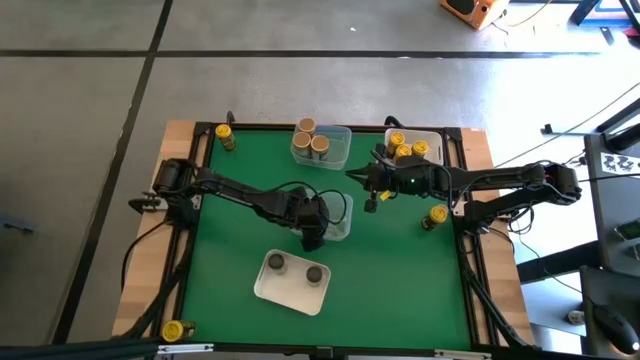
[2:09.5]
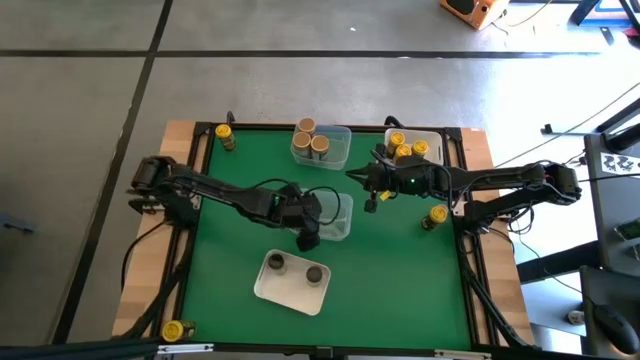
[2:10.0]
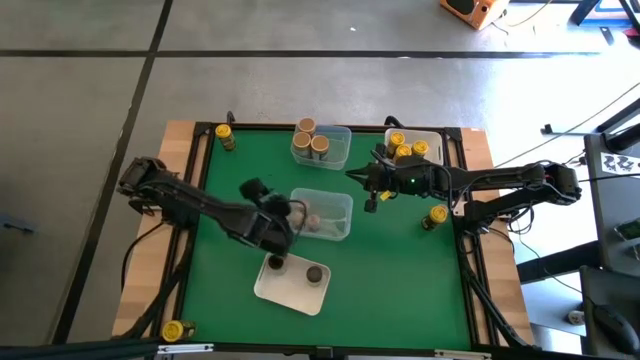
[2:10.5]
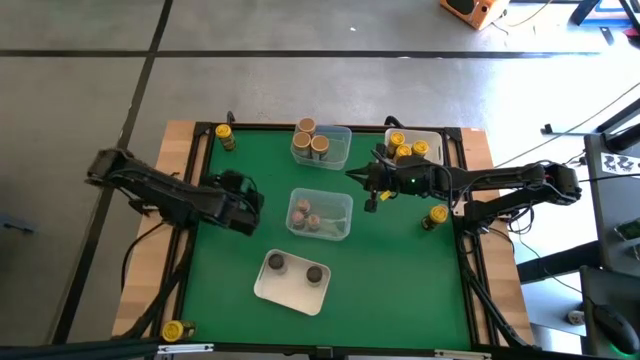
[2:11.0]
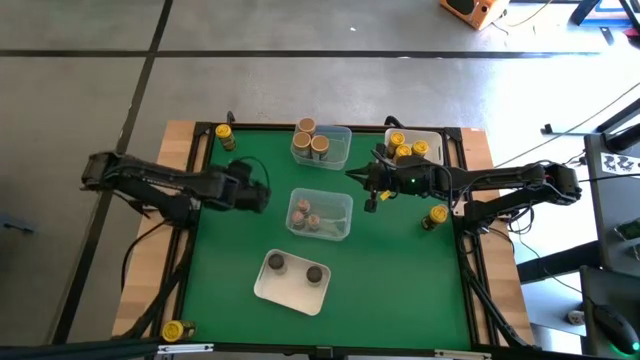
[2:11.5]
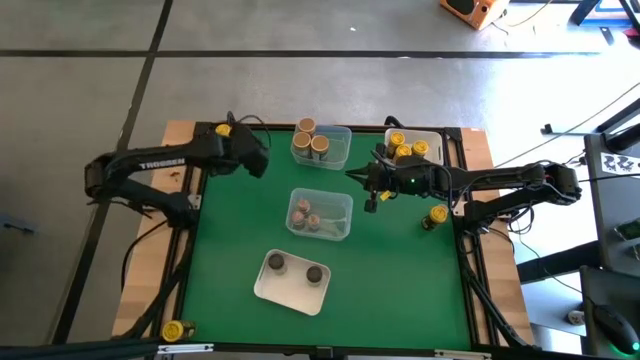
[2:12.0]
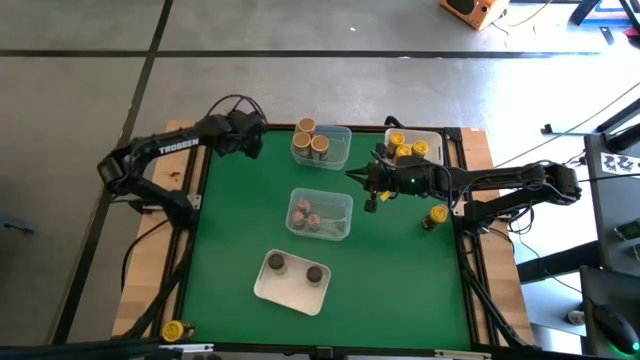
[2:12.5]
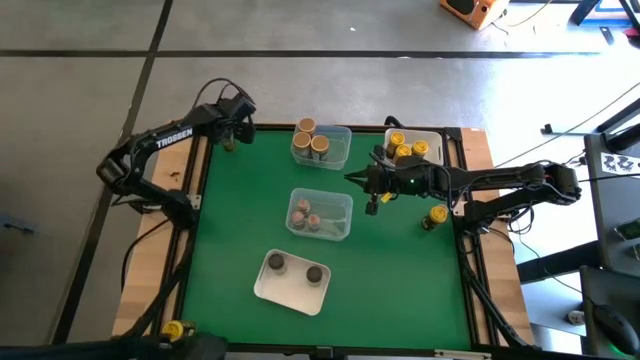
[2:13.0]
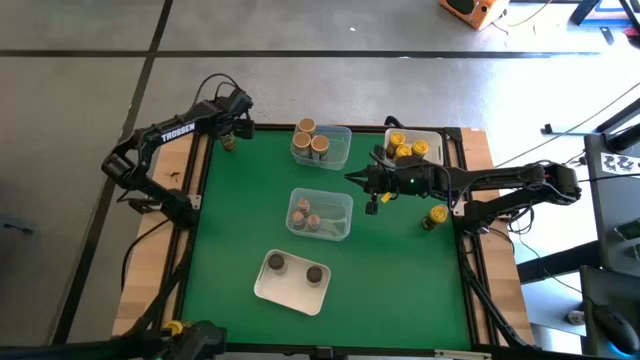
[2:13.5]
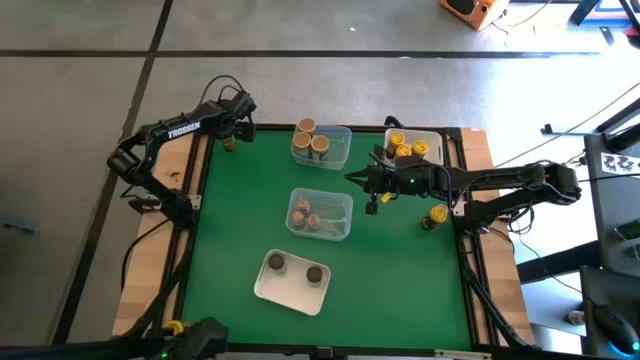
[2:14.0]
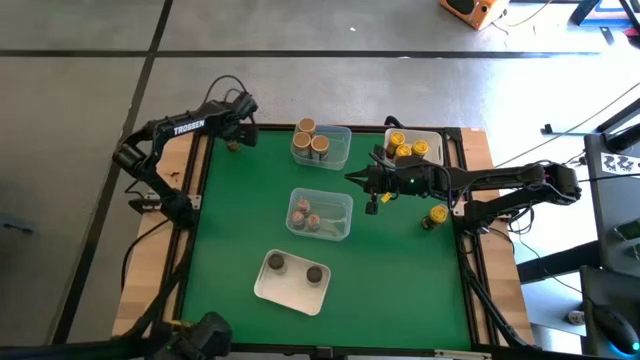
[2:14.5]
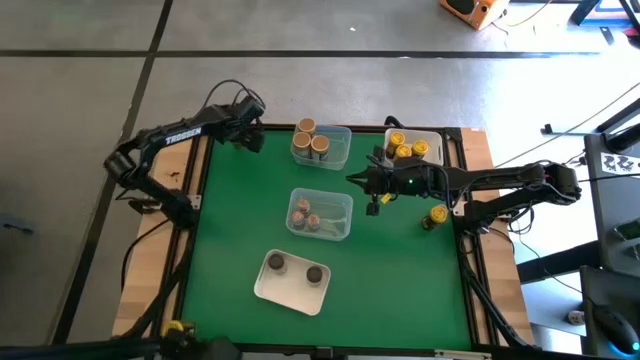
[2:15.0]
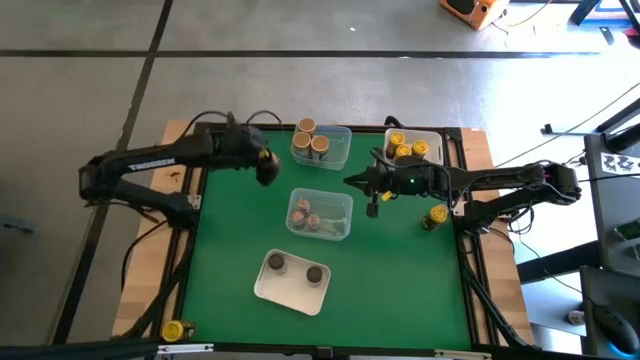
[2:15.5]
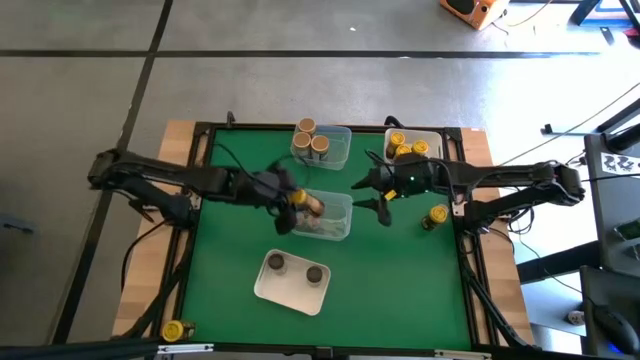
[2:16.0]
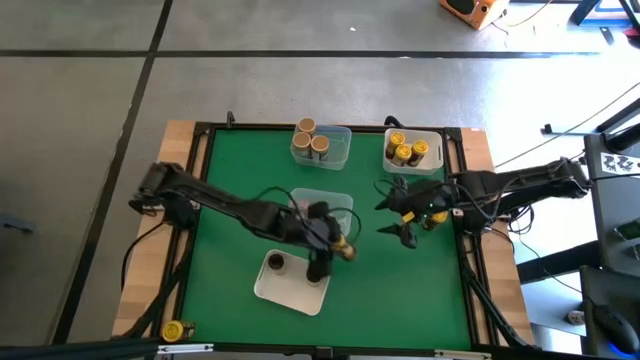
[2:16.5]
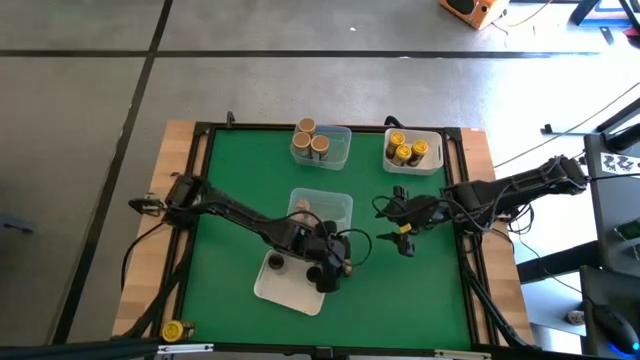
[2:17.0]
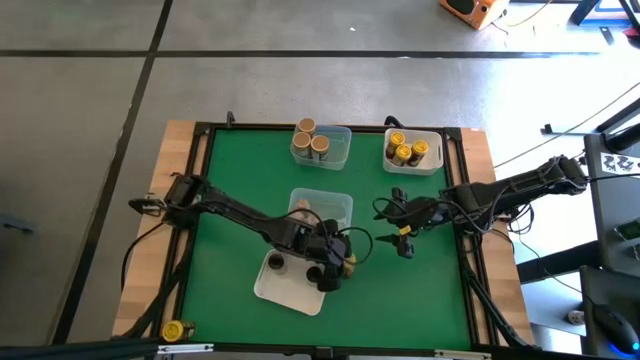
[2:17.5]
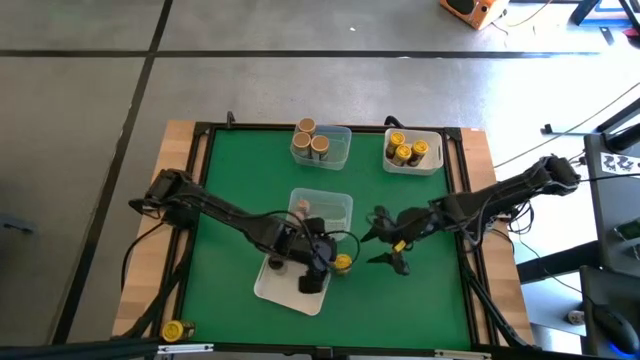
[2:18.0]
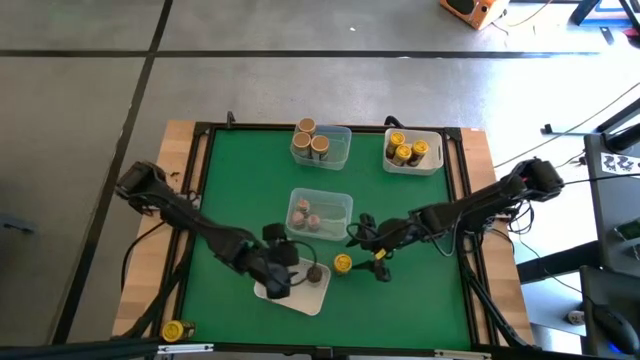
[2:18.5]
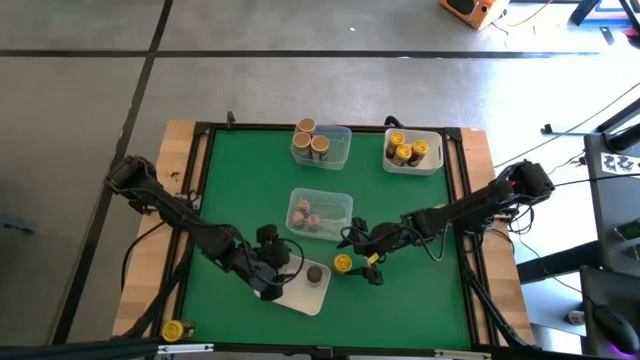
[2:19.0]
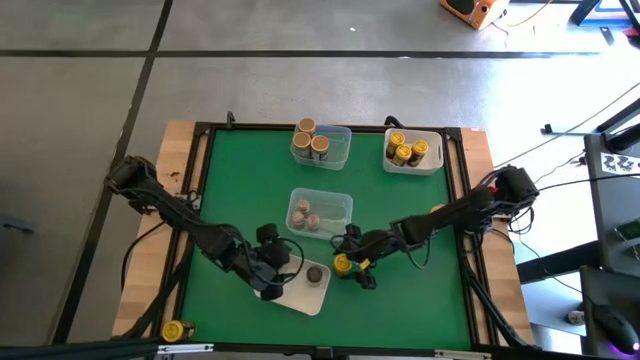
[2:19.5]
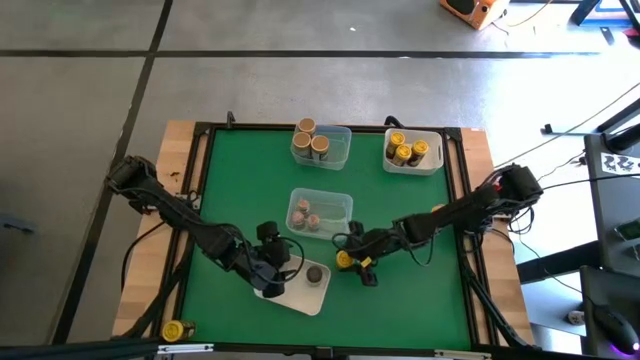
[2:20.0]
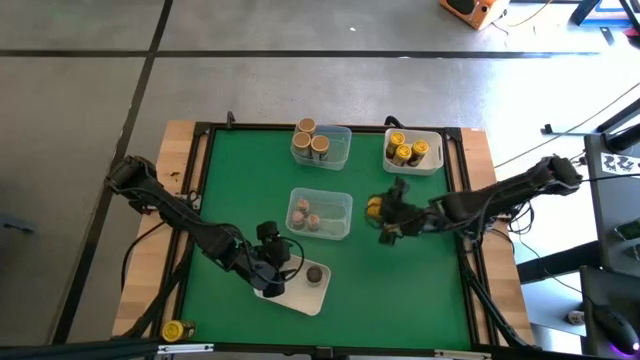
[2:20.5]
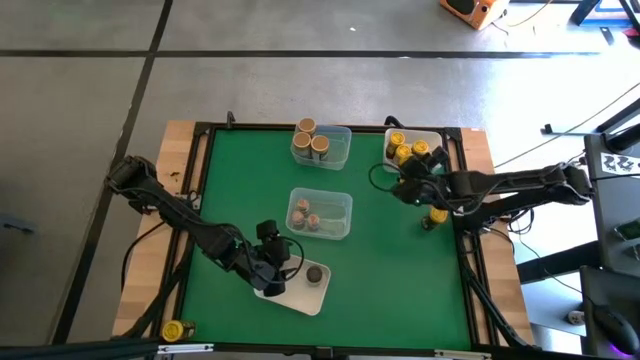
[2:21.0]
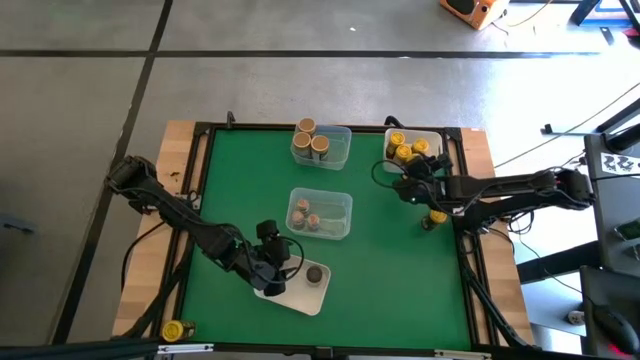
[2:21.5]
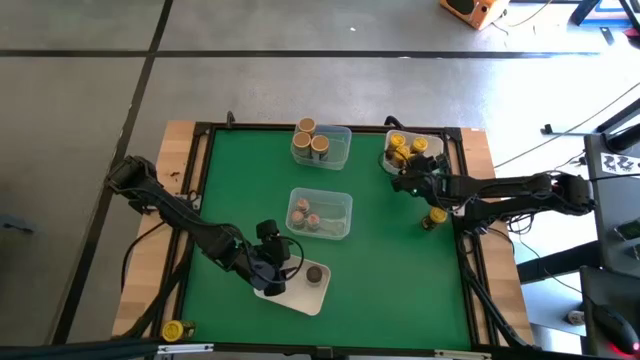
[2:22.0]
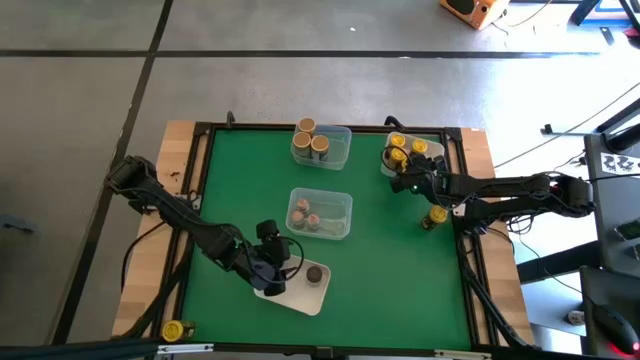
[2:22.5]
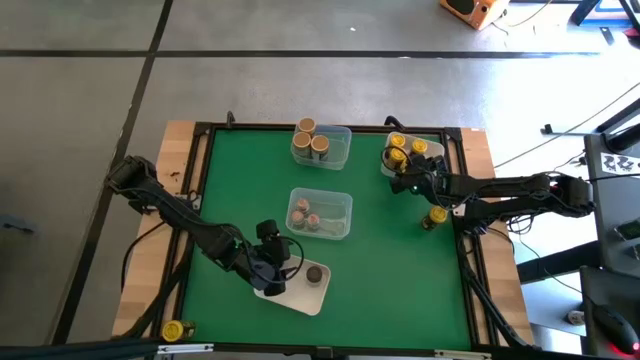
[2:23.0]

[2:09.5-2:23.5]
Task: Sort spices by type
Put the yellow seasoning bottle into the top white bin

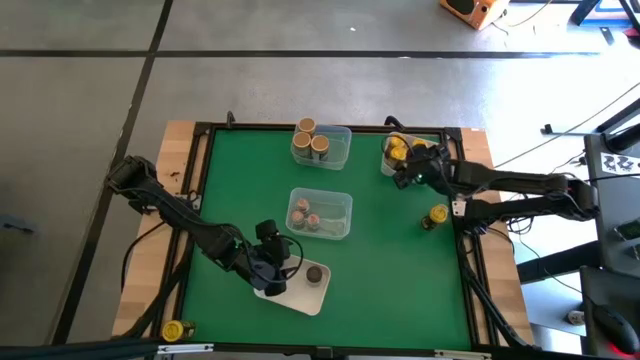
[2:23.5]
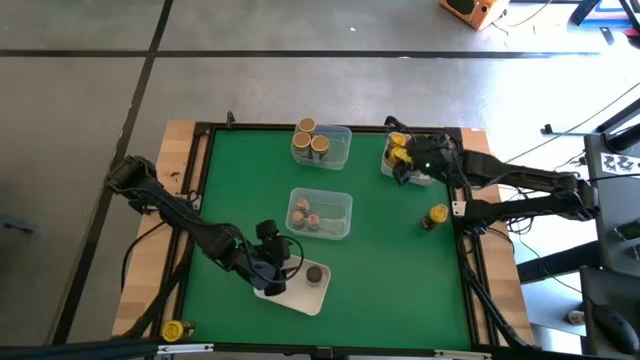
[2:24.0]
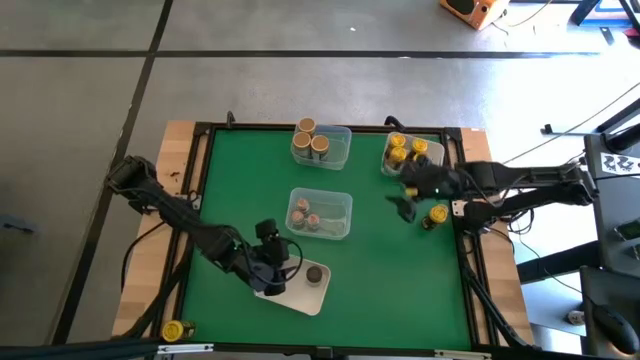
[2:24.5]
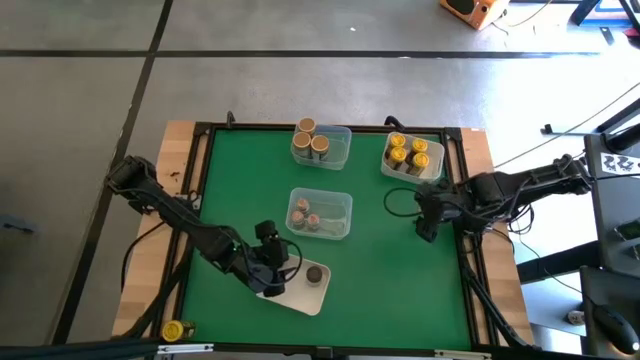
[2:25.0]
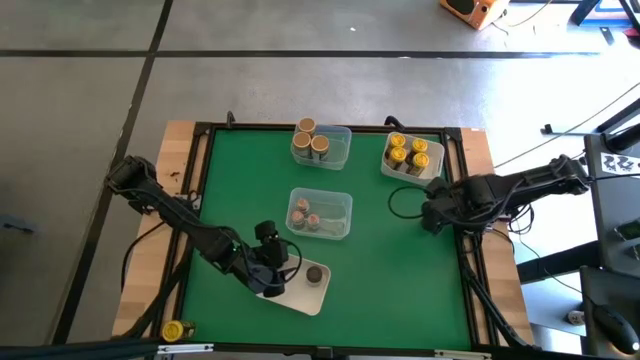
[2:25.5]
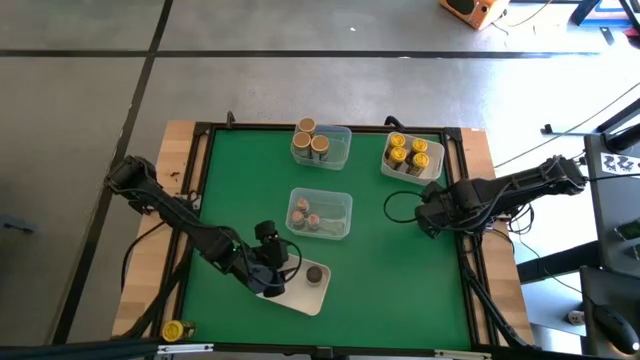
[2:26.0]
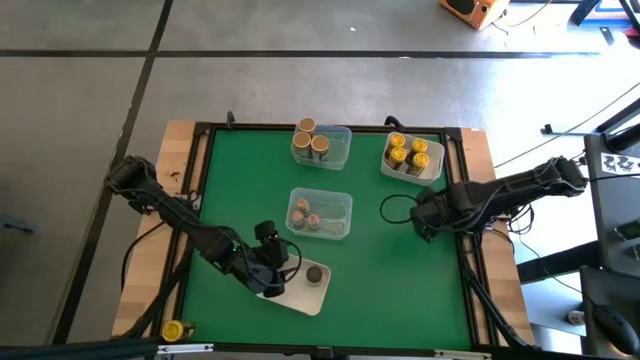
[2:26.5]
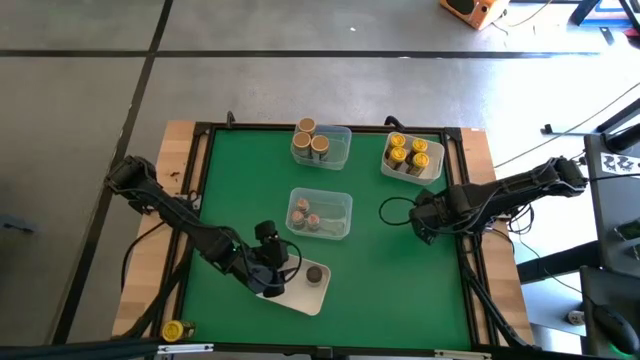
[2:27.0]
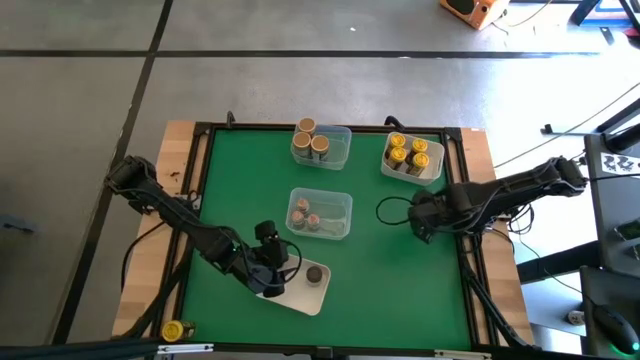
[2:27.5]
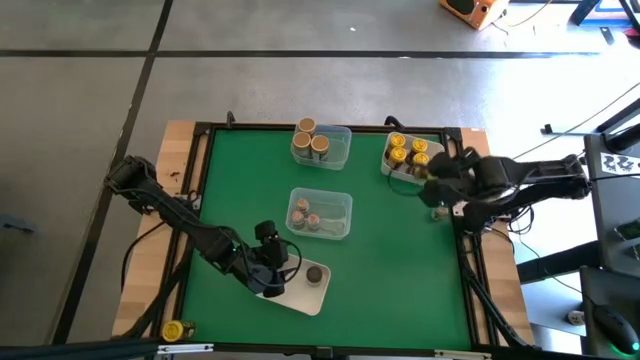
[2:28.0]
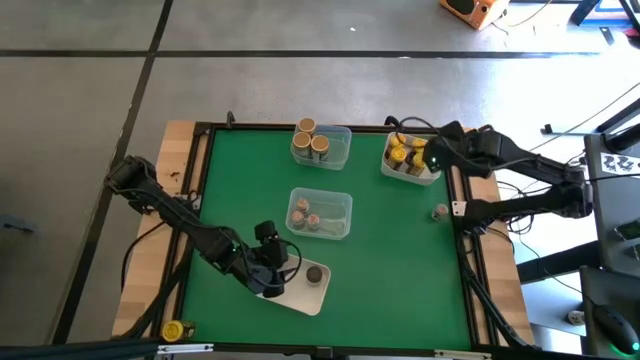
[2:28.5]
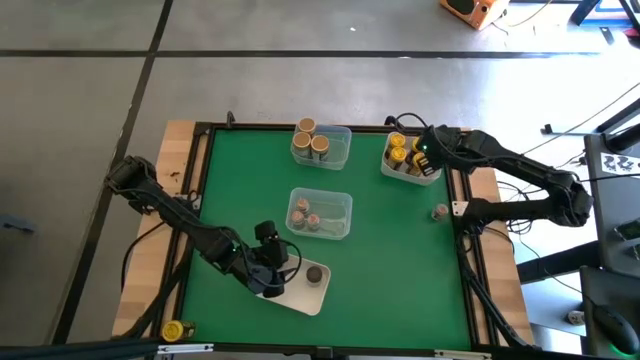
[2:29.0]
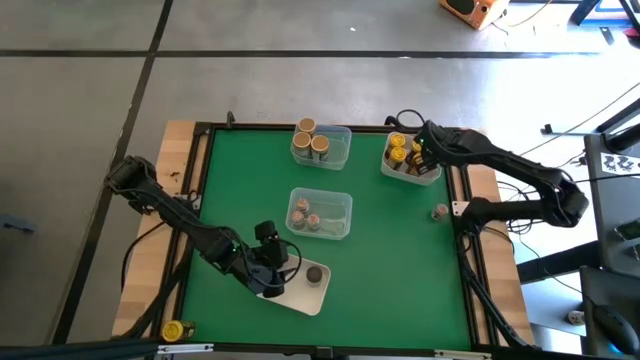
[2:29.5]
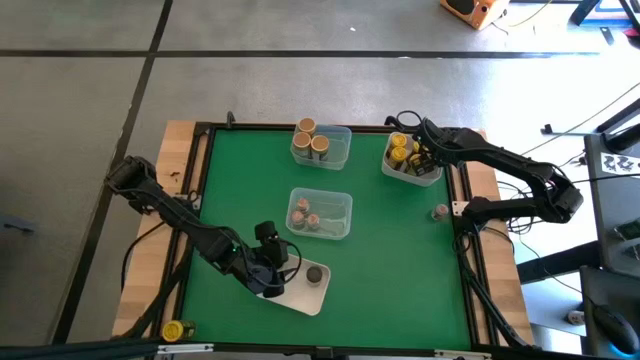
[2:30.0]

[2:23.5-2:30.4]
Put the yellow seasoning bottle into the top white bin
